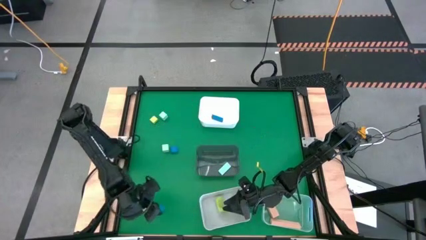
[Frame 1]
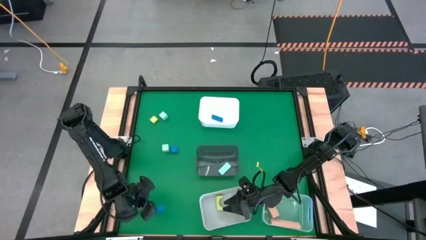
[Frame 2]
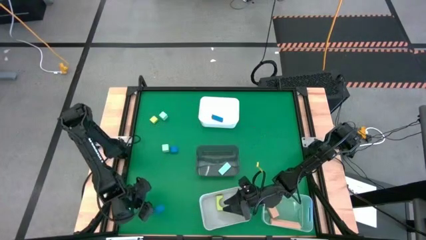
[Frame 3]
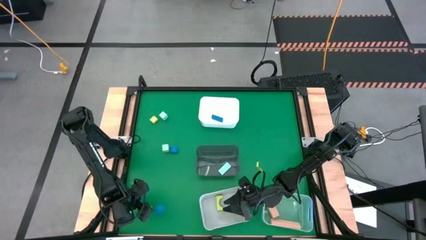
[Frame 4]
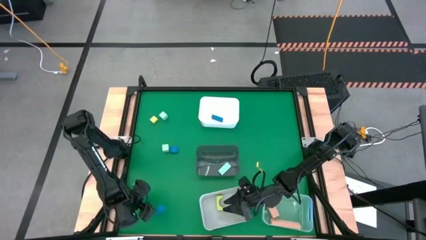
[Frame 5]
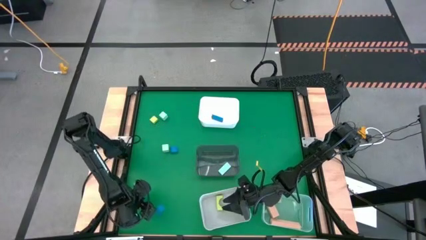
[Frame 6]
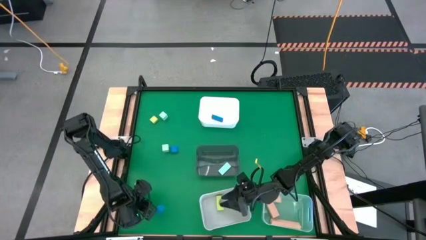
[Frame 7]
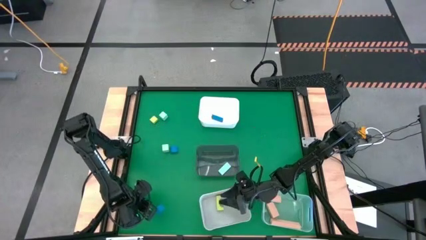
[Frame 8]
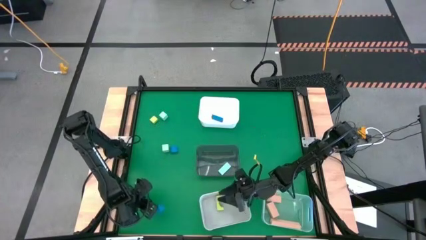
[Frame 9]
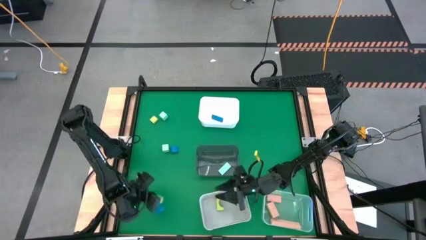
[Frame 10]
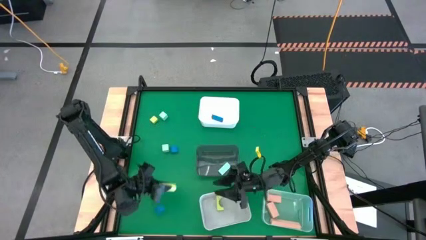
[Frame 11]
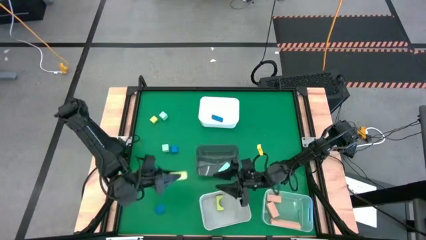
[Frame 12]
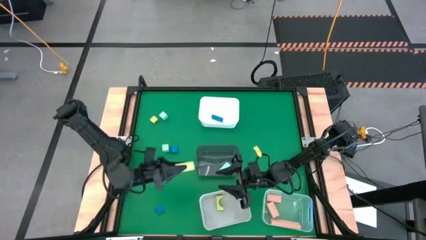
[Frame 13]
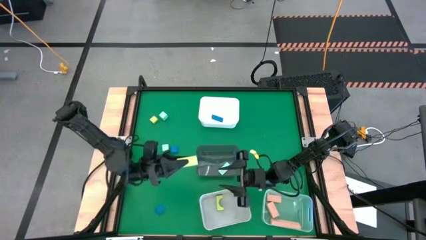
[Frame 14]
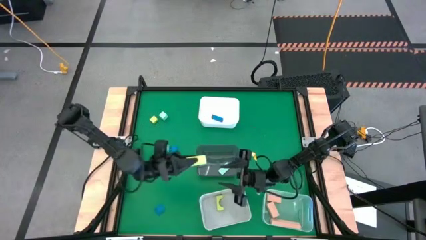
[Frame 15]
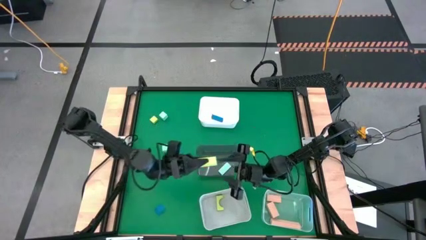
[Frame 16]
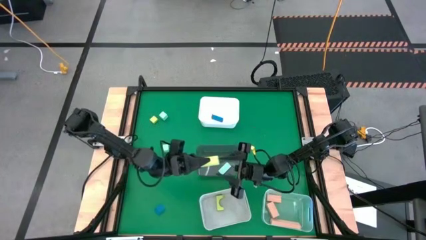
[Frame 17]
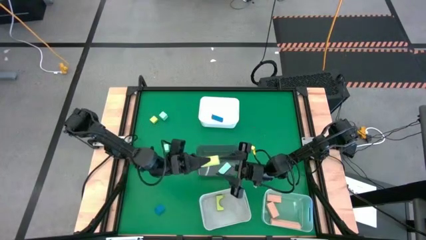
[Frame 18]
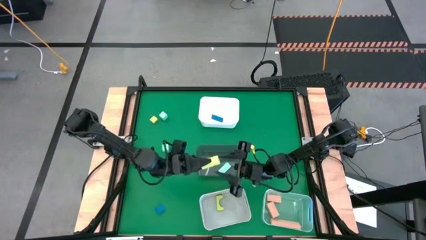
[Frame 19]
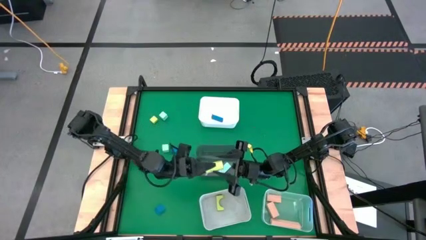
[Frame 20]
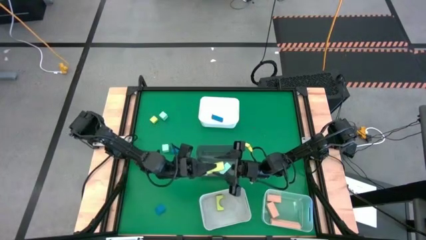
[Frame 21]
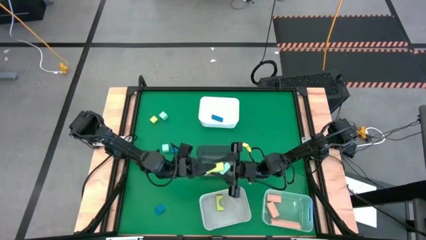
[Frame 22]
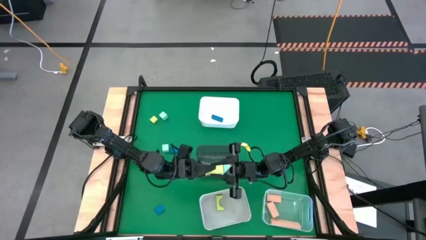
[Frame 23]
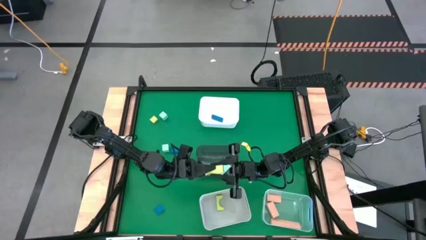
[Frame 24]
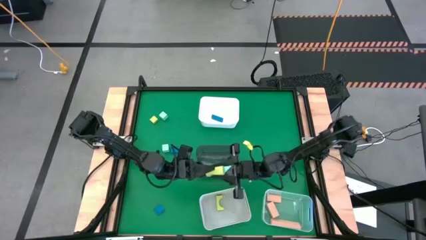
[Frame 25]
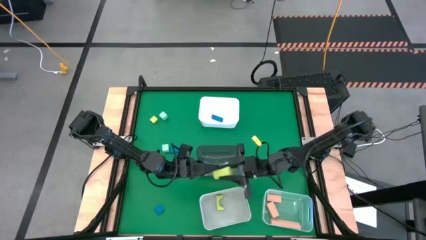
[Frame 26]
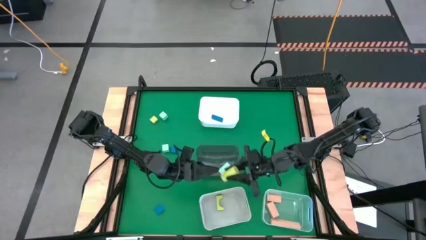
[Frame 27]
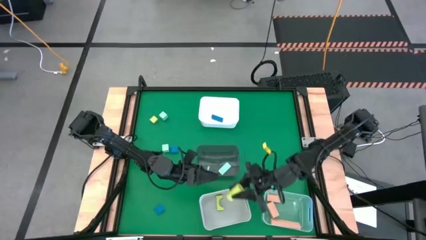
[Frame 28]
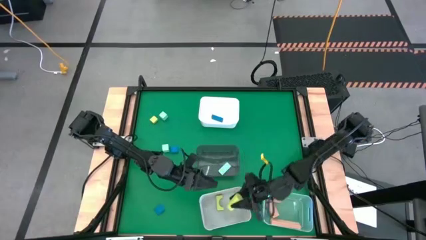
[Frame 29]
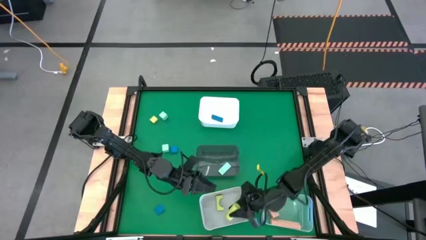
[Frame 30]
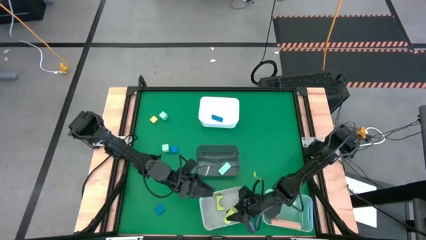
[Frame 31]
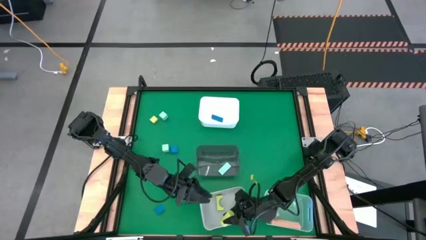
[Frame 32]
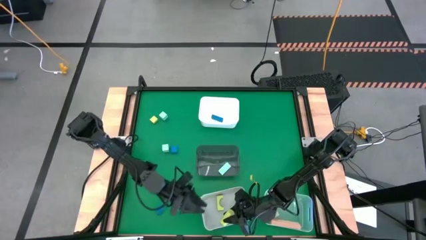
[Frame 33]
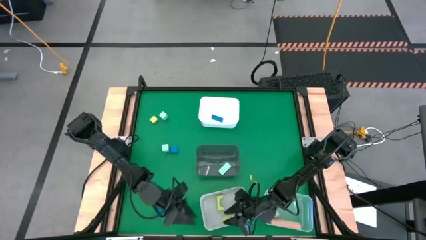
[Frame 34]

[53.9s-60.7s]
Task: Sort & place blocks by color
Put the bottom light green block into the gray bin

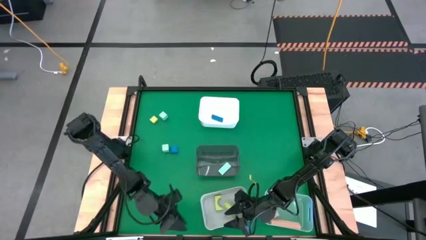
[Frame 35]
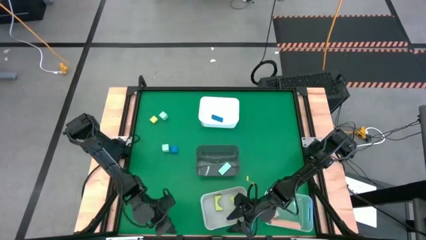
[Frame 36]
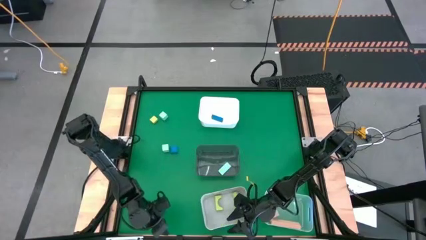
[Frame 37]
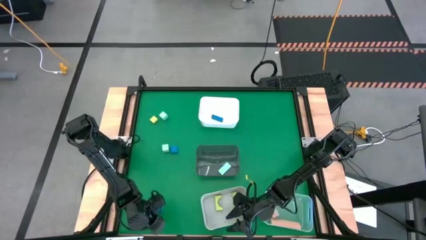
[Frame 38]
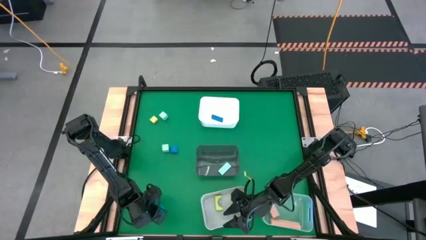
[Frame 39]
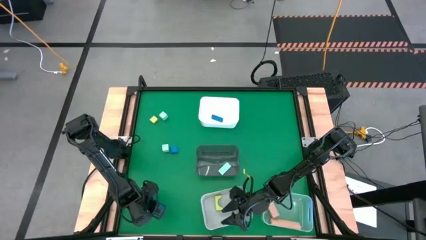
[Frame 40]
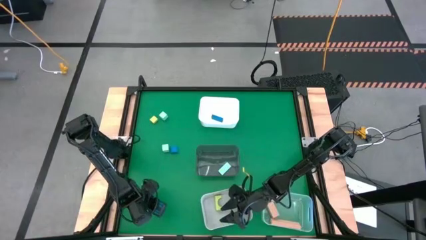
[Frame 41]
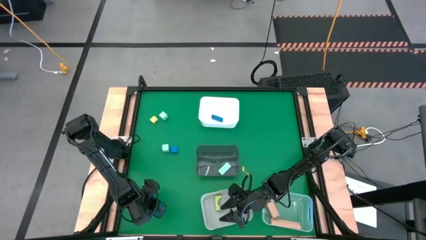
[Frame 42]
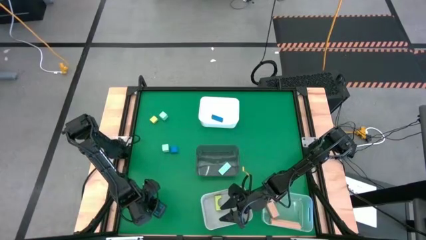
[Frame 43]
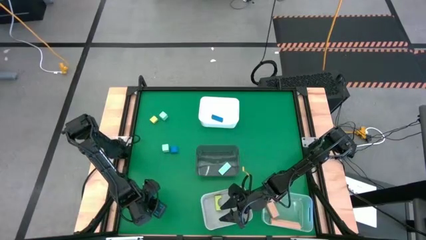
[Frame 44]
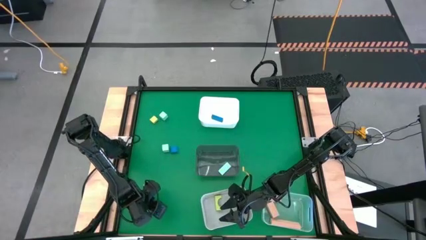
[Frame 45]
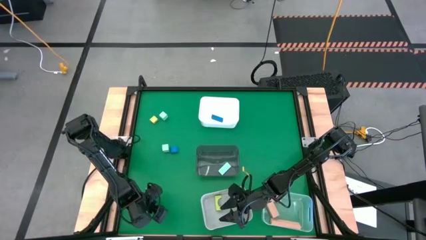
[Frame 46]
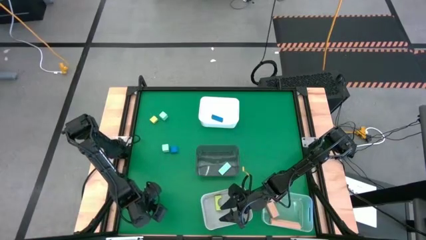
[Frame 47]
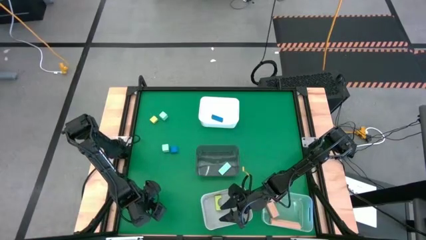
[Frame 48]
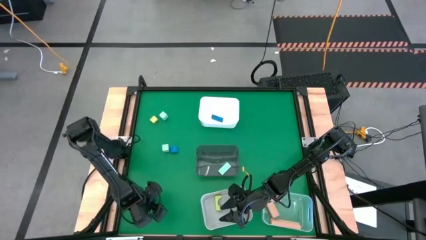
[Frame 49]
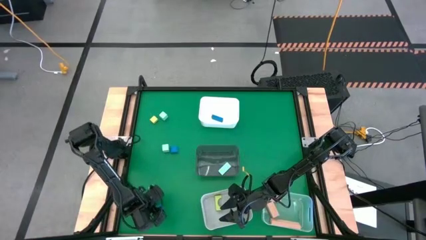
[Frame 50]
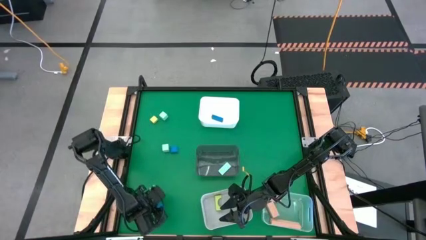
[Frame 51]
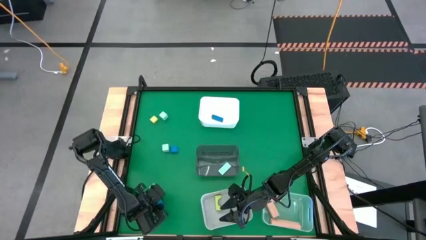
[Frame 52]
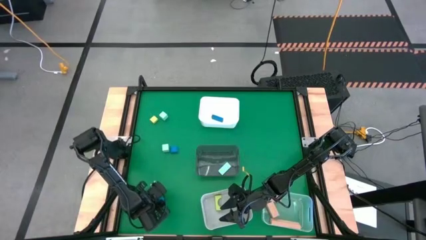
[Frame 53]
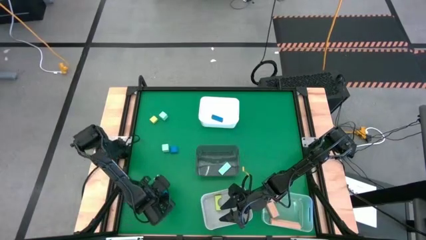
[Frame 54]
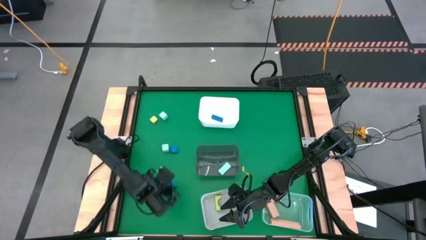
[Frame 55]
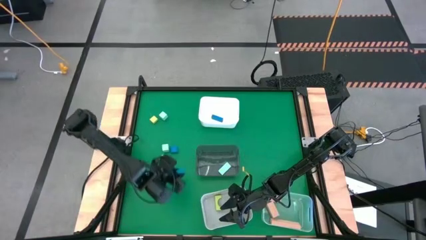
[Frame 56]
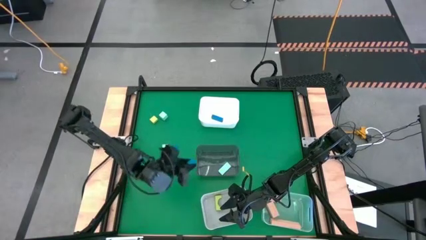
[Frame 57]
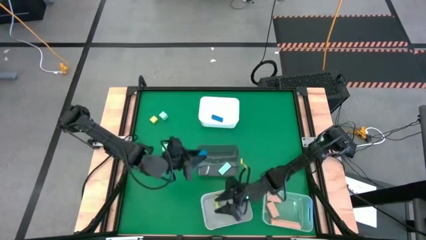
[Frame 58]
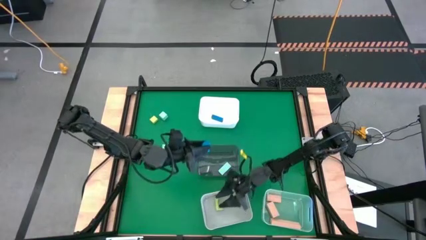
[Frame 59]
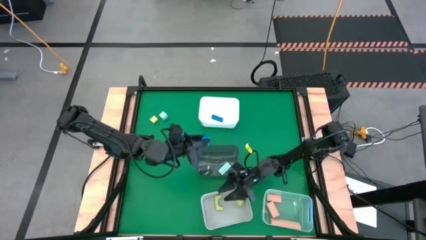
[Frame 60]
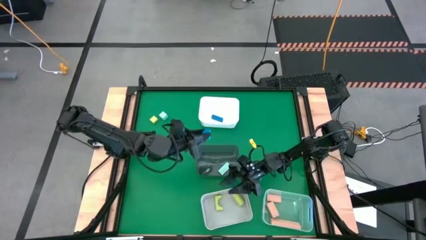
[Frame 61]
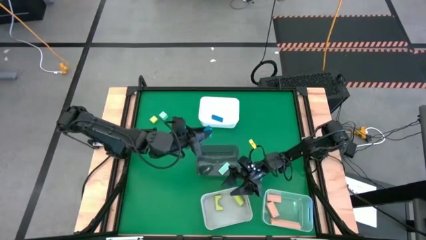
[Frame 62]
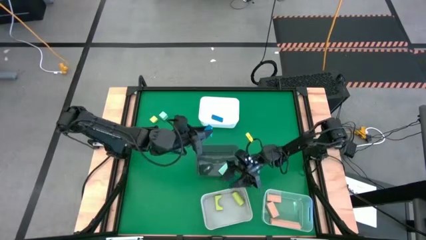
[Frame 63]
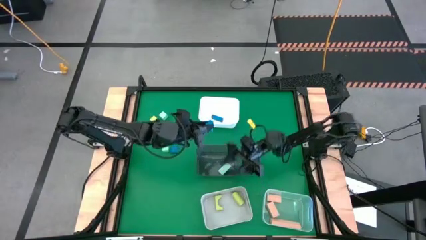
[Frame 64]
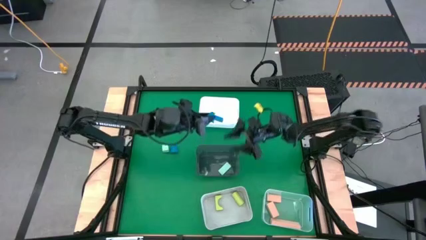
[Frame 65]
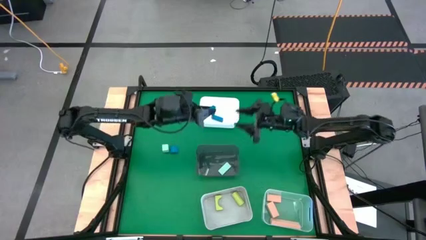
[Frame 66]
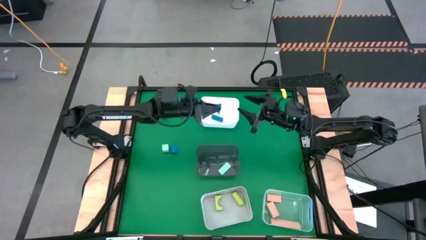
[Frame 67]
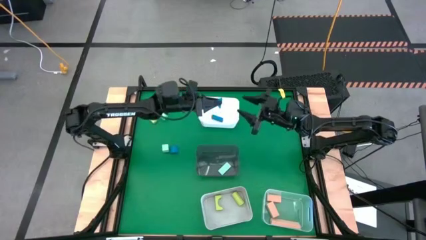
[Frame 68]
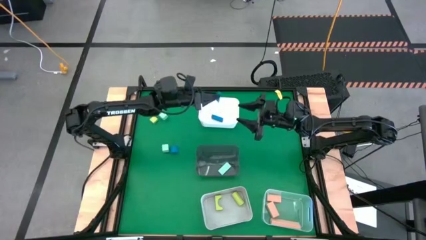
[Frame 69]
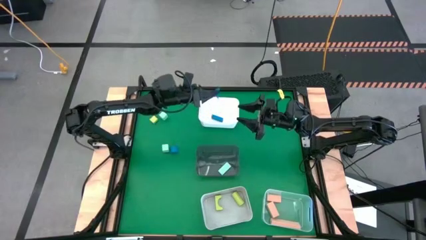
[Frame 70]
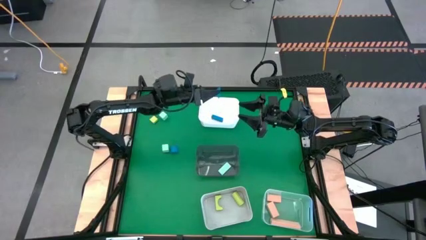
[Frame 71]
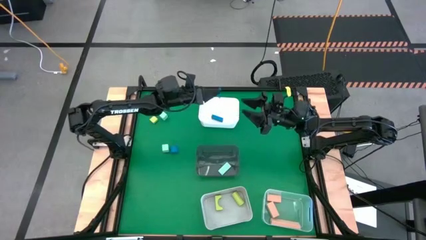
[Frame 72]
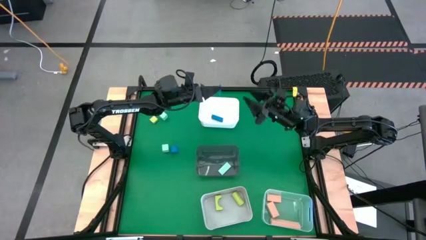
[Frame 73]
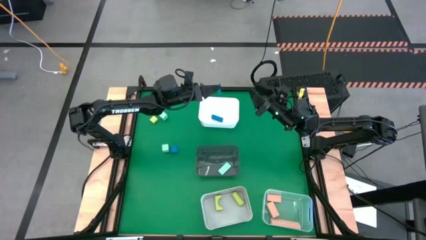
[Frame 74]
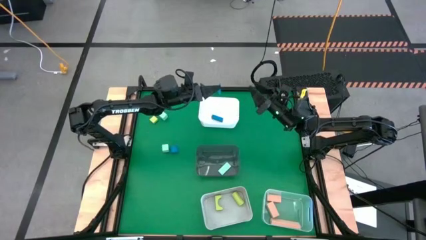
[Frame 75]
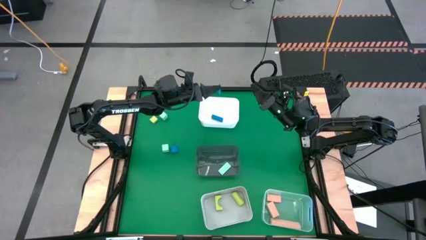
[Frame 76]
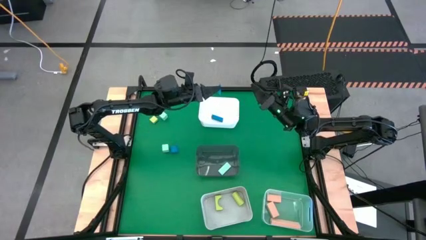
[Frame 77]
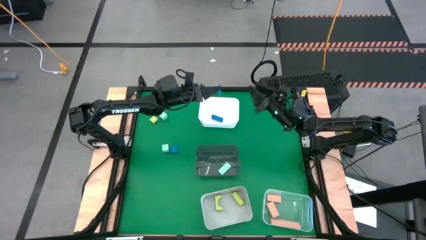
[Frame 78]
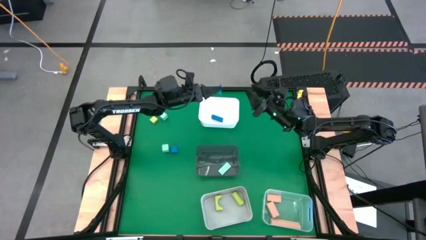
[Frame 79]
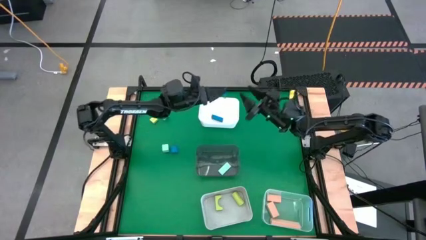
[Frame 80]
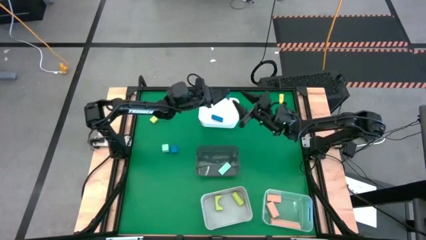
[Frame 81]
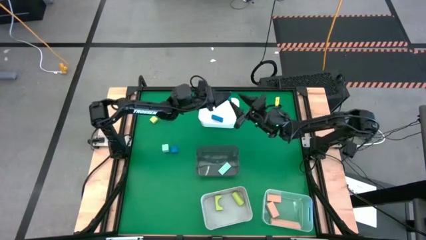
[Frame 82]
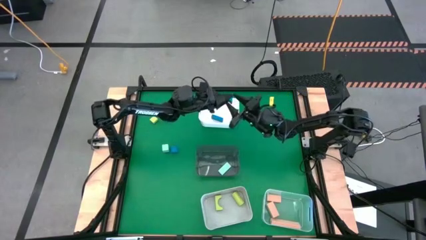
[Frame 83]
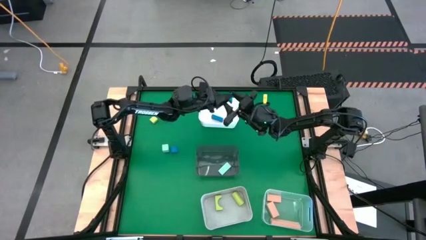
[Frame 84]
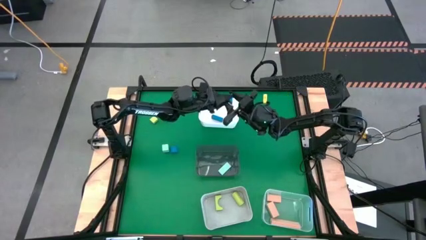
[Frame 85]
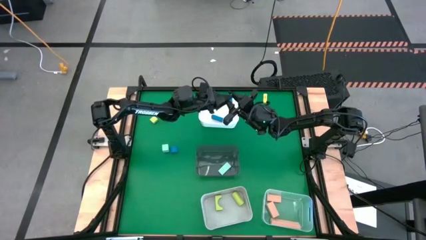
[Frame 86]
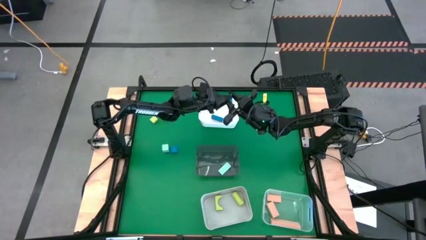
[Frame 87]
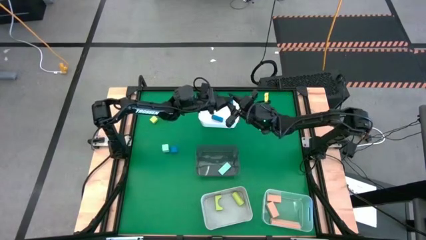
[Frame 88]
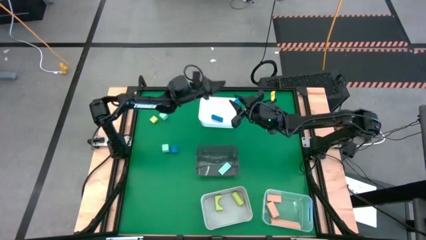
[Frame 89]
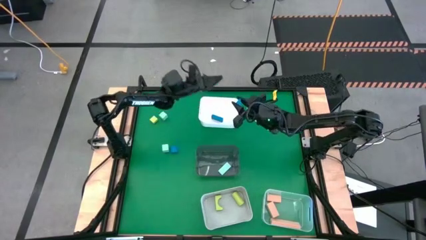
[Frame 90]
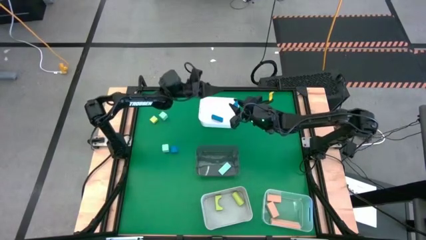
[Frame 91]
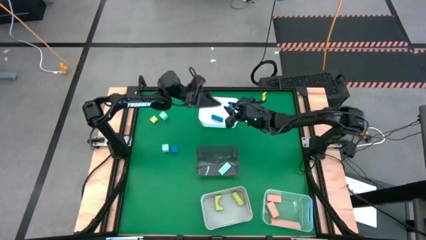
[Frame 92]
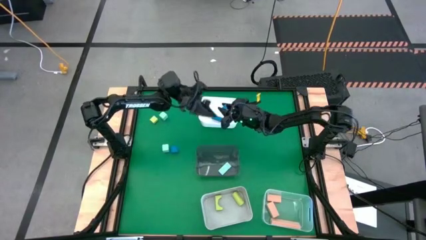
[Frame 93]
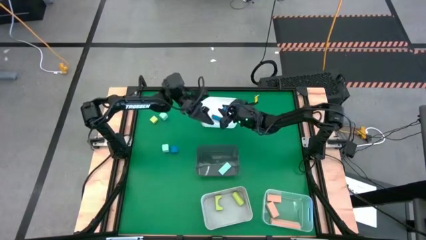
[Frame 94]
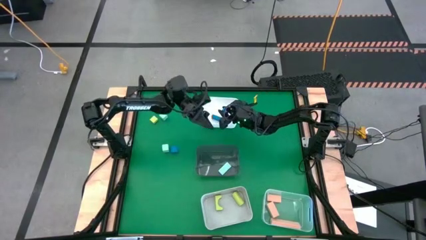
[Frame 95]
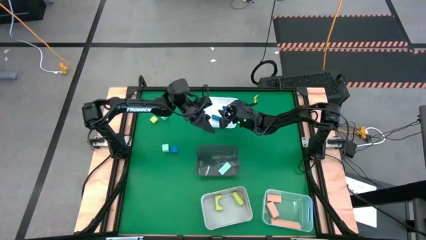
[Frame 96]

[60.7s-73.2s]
Put the bottom blue block into the white bin
